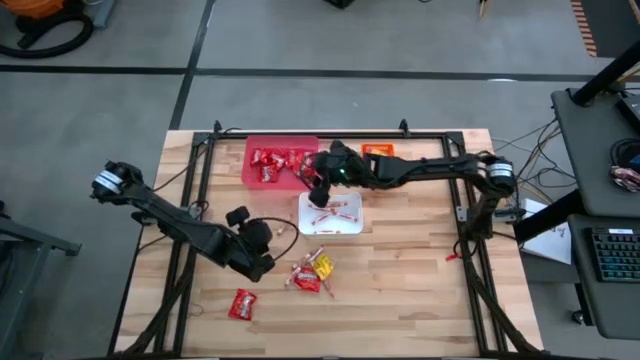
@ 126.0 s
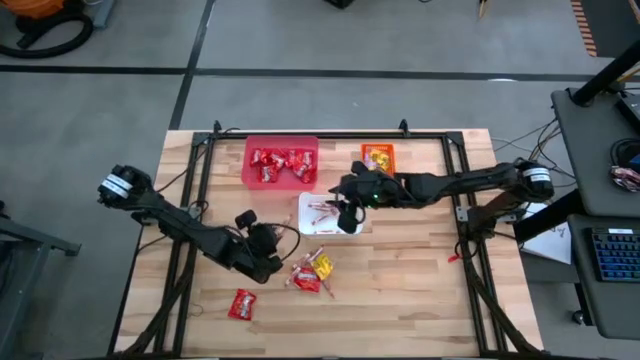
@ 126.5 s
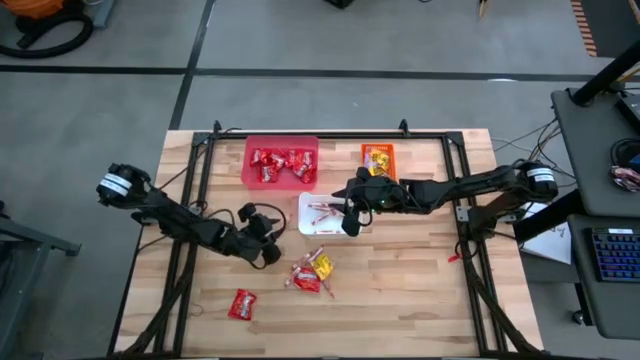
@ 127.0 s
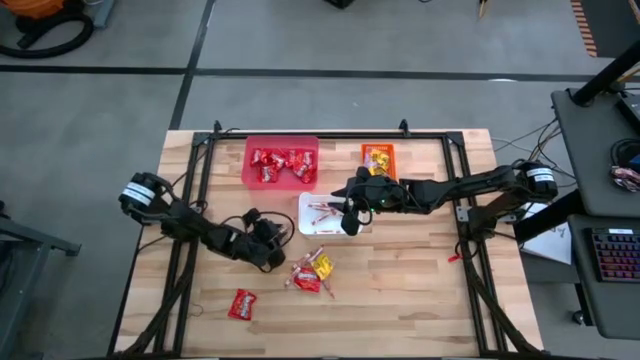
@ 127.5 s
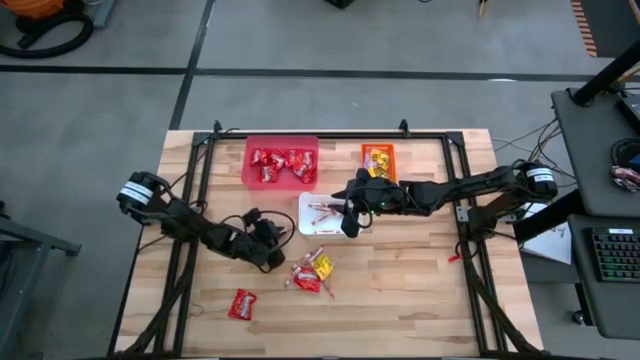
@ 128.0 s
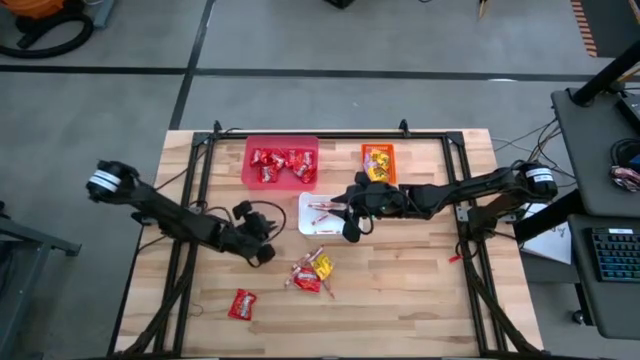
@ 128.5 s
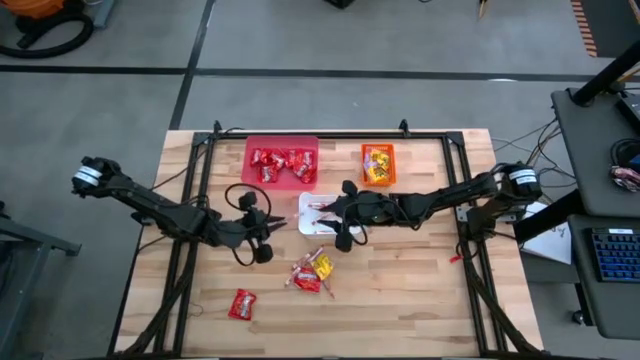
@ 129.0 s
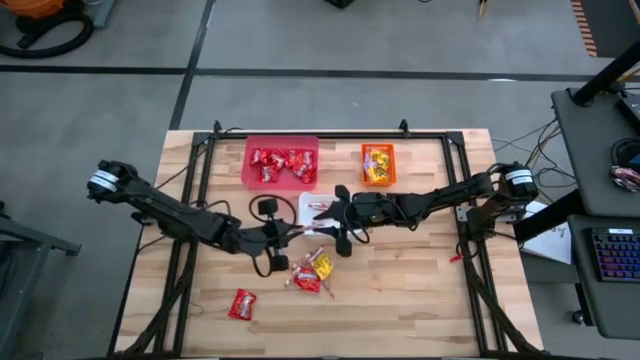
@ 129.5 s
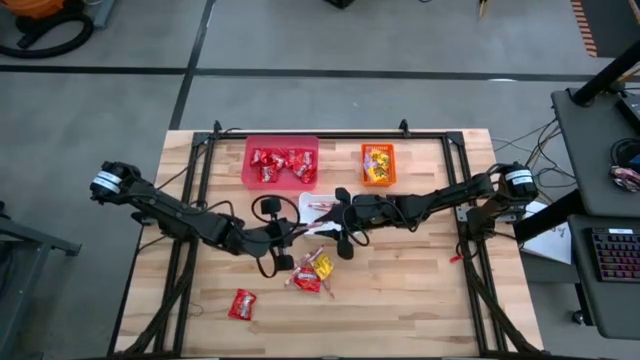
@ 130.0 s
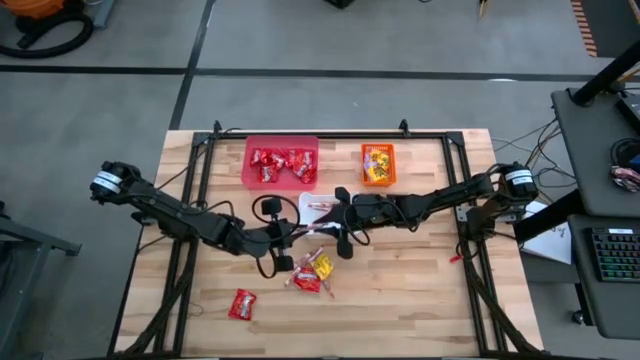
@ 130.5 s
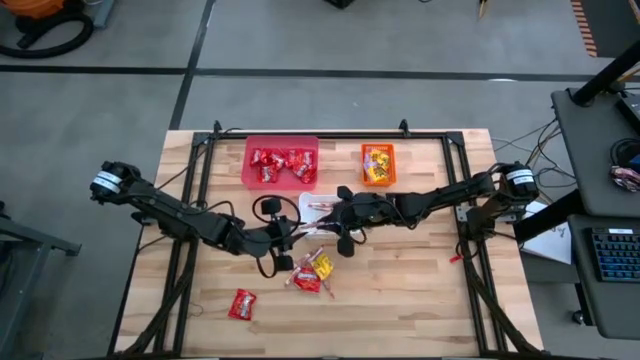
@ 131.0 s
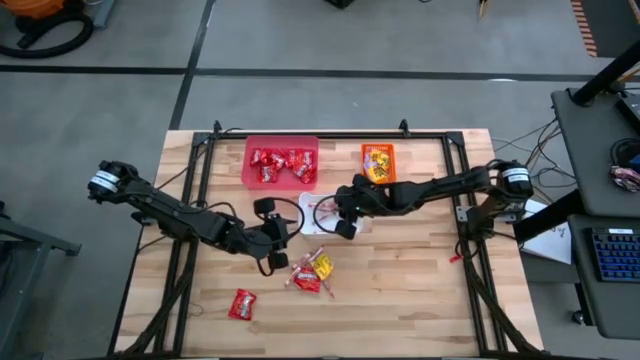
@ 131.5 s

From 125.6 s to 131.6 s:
Task: Sort candy
Put the white candy into the white bin

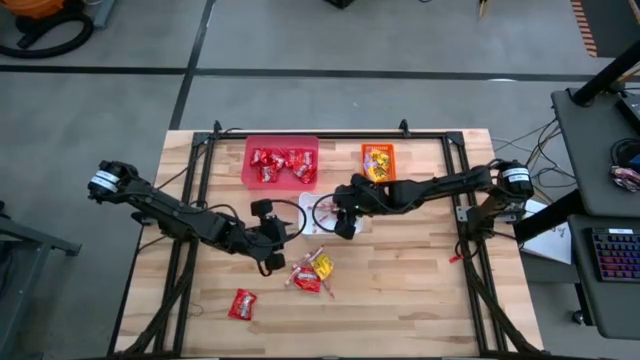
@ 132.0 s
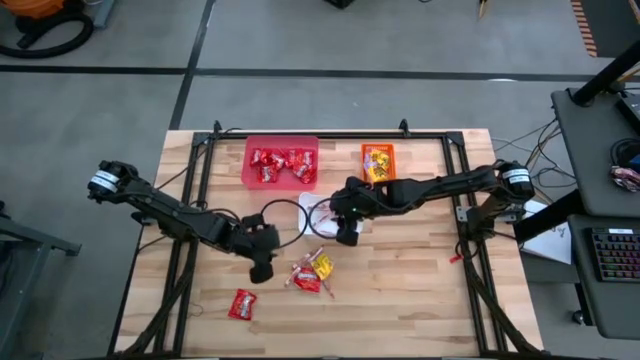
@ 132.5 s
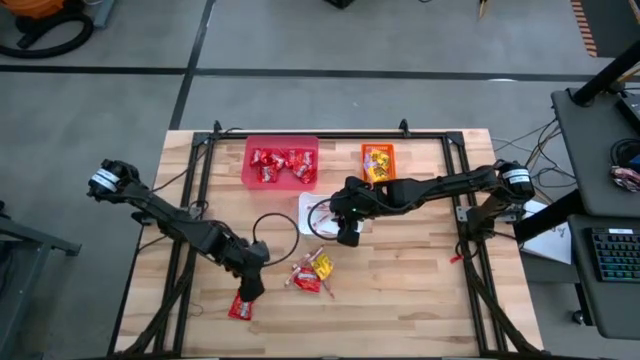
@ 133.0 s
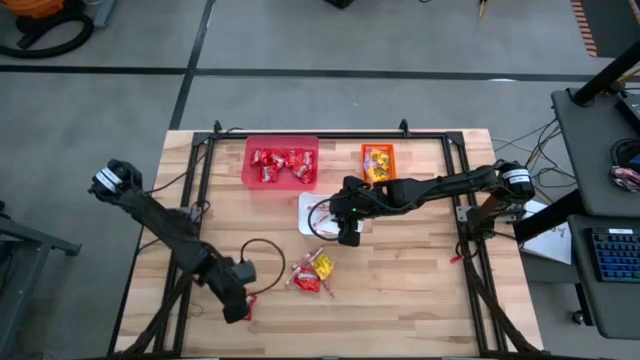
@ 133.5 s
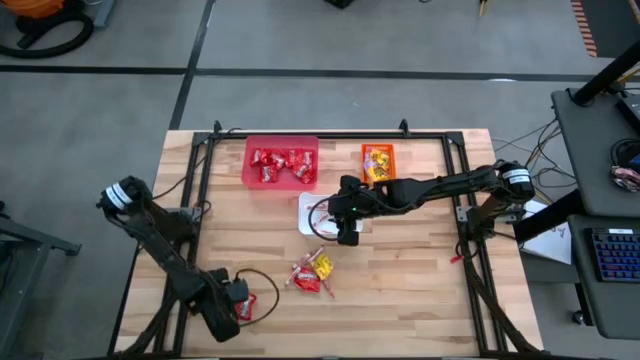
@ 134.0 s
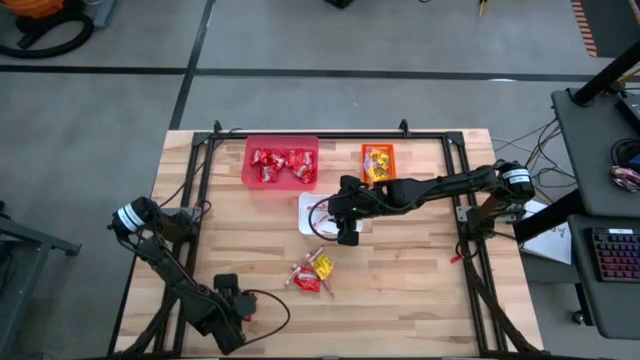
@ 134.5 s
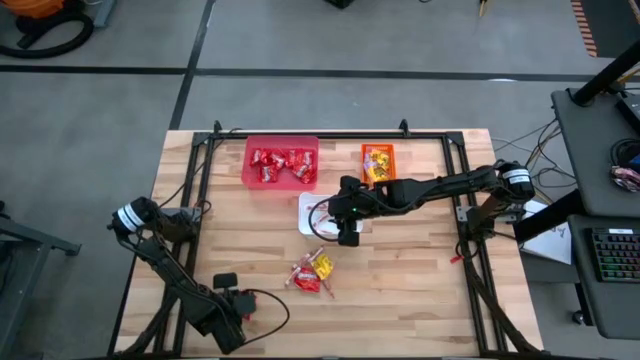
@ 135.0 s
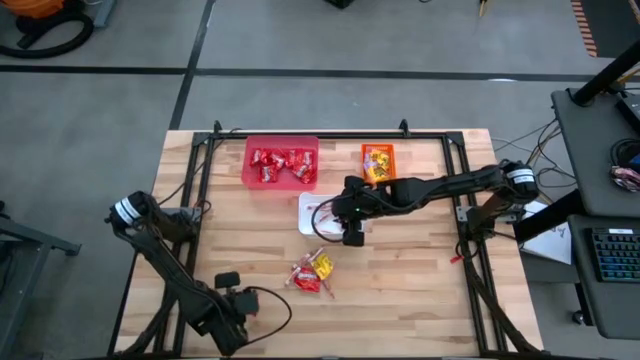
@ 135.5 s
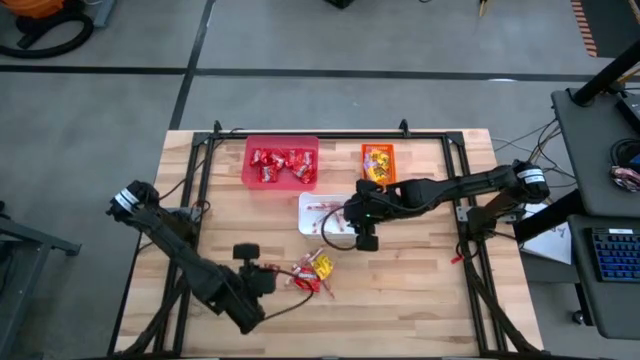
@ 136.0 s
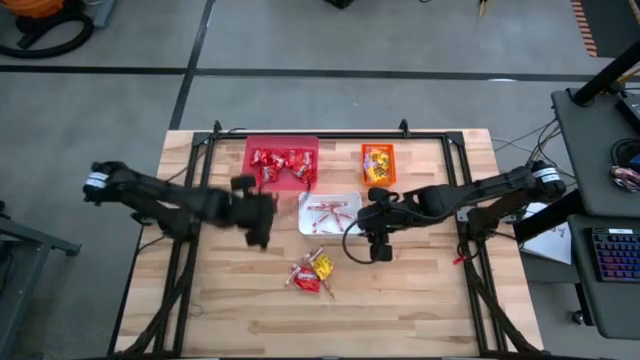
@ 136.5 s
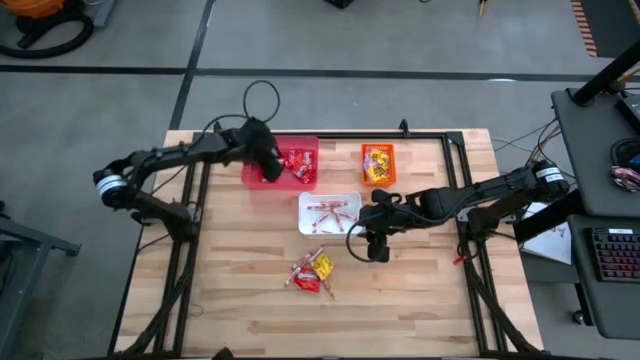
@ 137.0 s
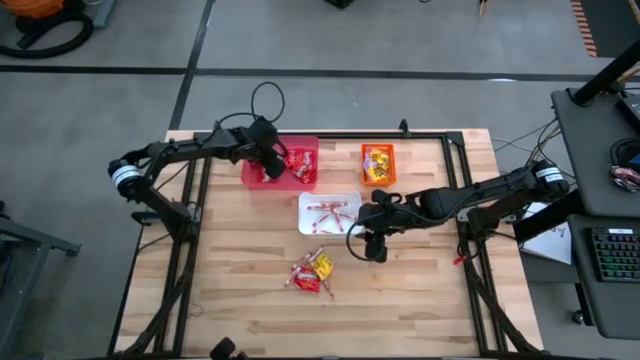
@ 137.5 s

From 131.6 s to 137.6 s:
Put the red chocolate into the red bin

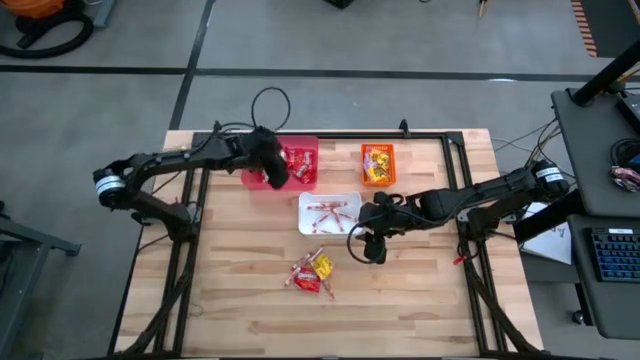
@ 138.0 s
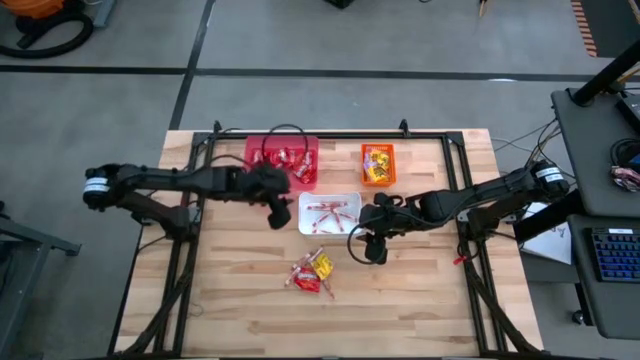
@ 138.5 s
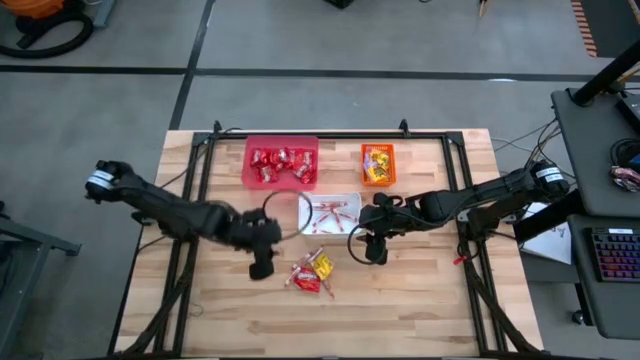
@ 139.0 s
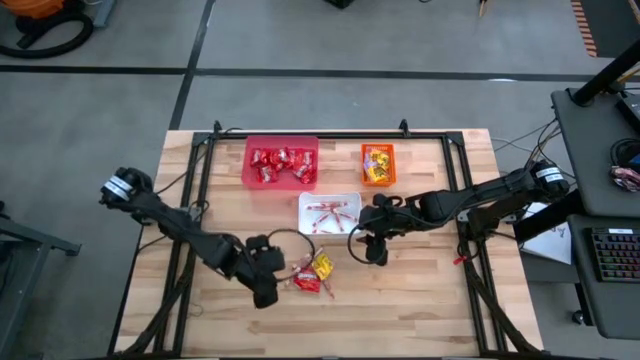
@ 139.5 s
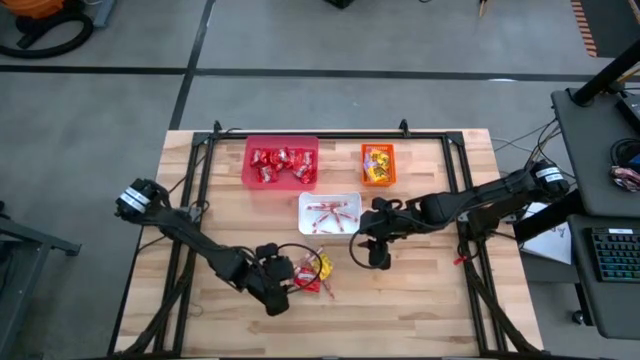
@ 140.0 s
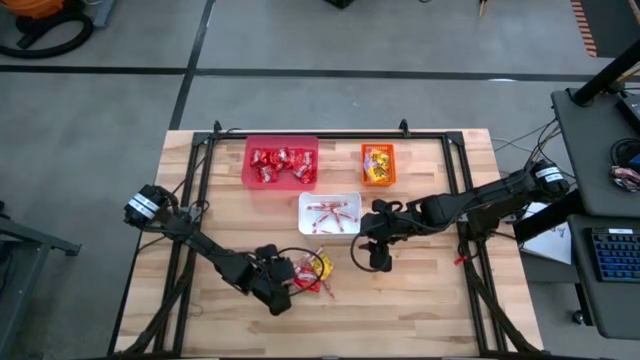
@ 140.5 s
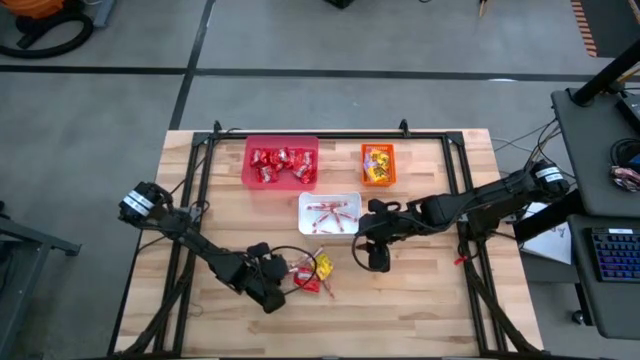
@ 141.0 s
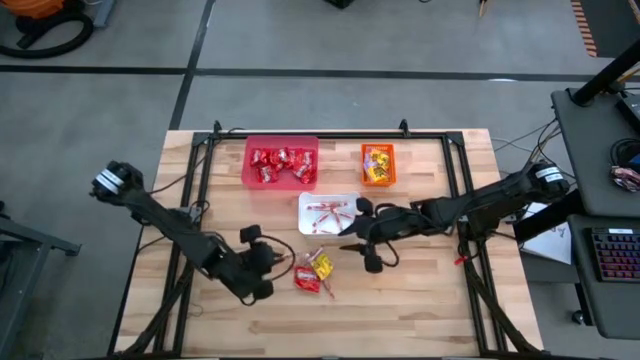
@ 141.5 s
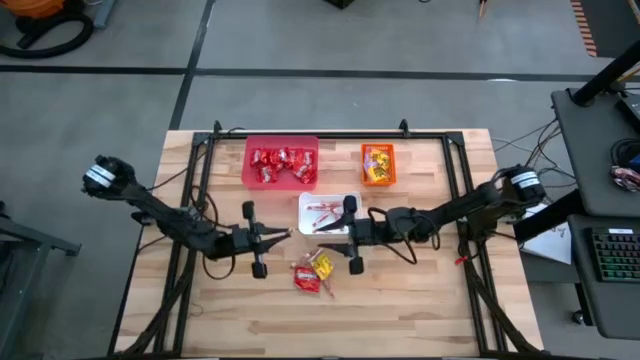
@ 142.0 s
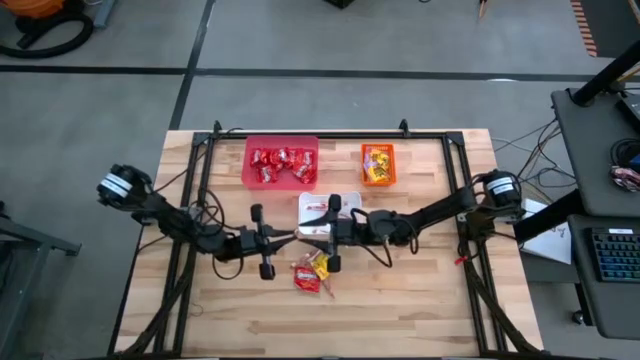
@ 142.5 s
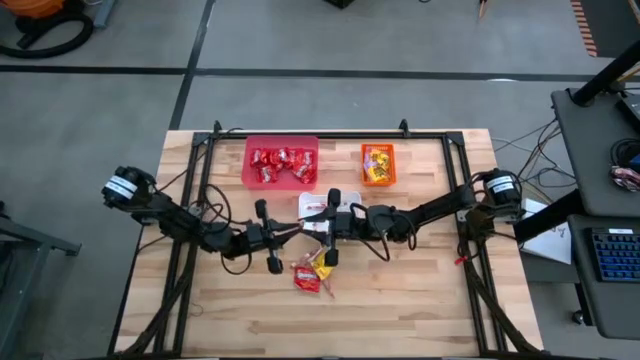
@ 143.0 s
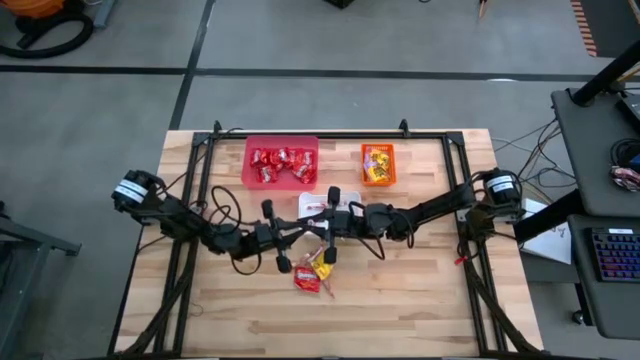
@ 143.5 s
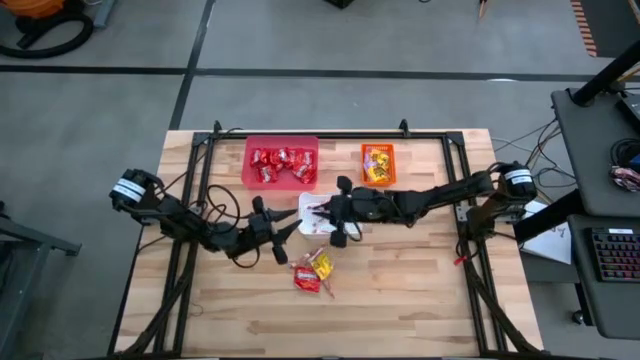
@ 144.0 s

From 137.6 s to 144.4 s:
Put the white candy into the white bin

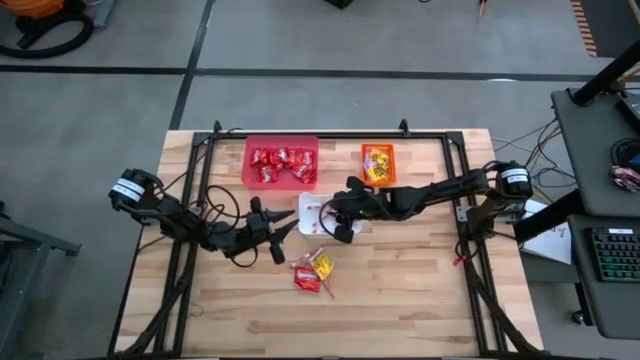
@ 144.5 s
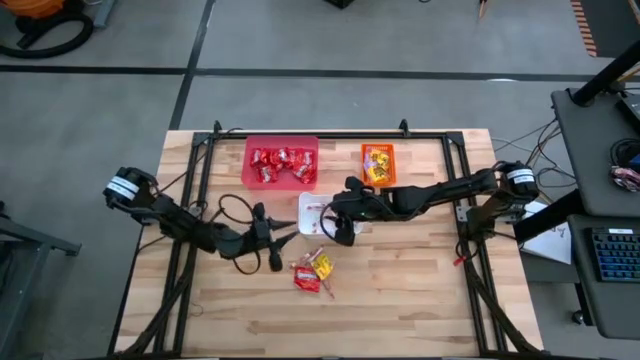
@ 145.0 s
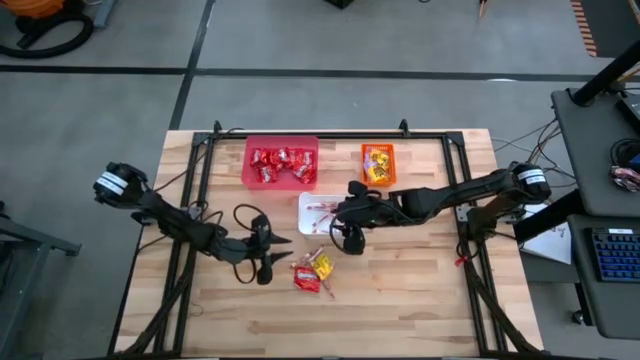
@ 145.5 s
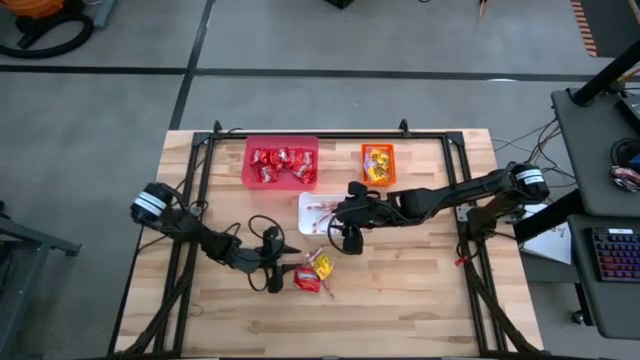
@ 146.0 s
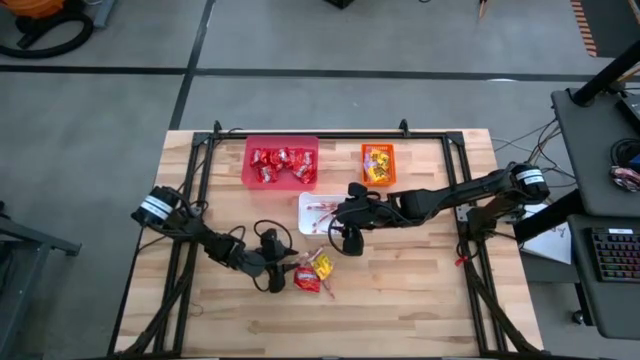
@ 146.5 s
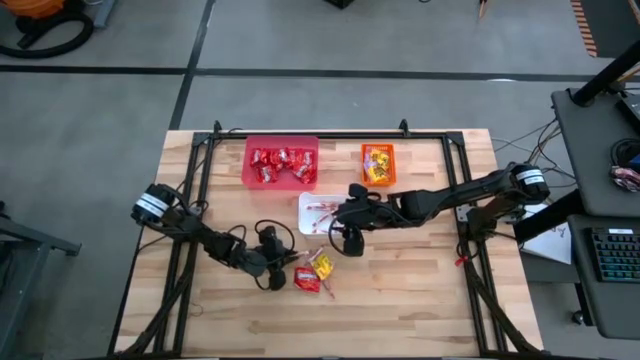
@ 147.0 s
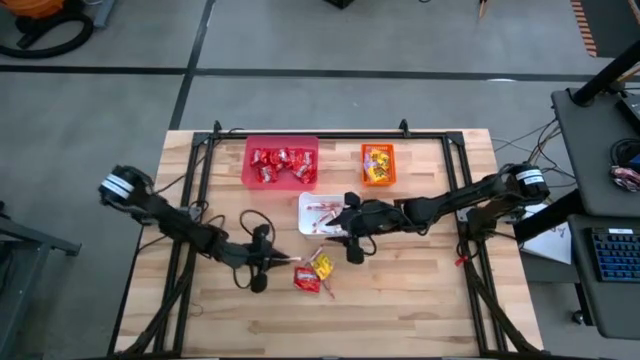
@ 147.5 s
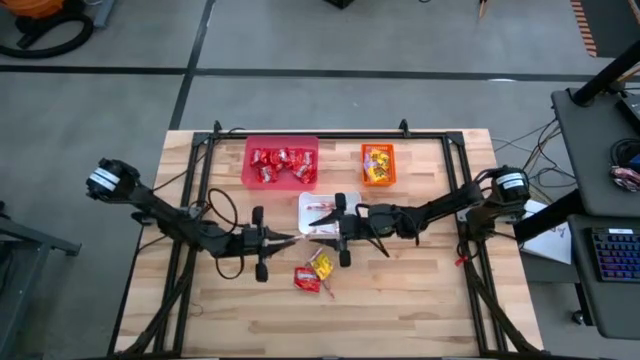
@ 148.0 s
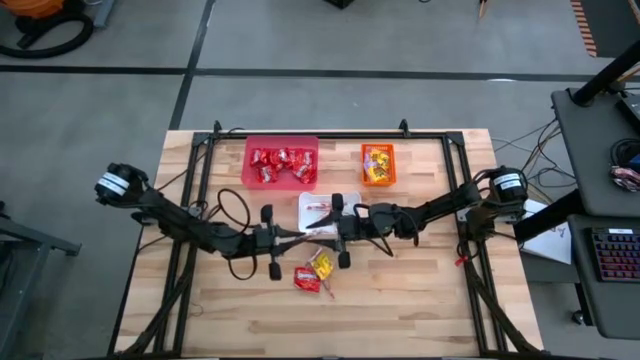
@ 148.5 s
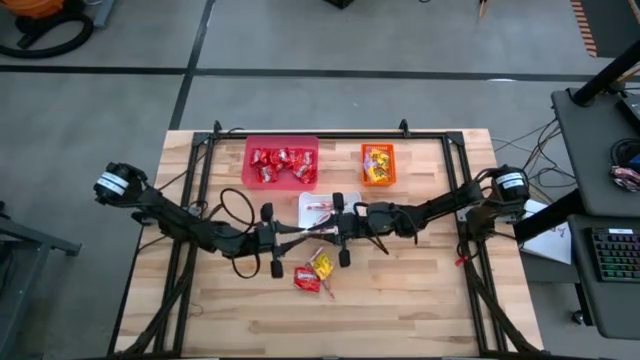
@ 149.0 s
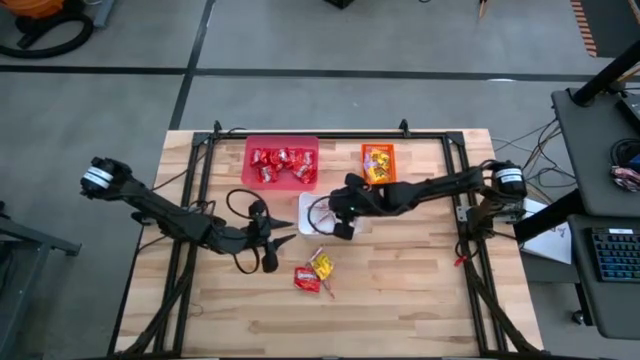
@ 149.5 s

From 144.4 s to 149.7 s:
Put the white candy into the white bin
